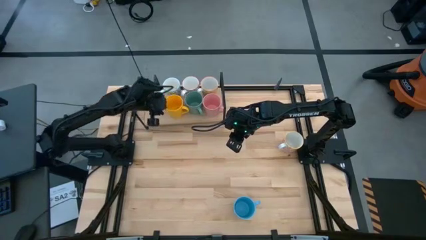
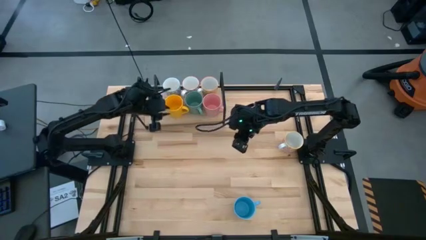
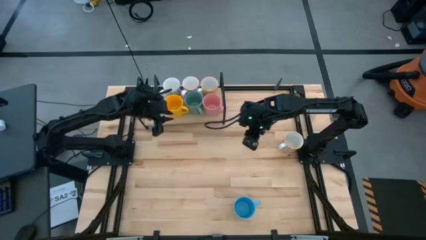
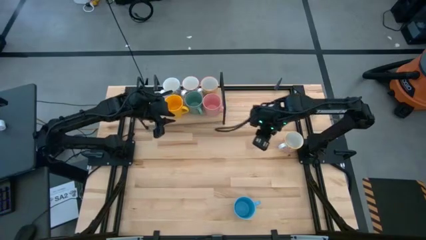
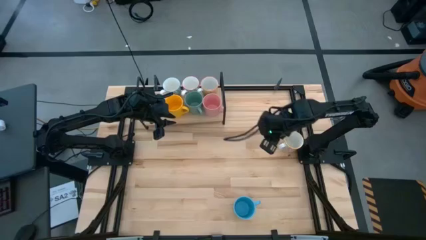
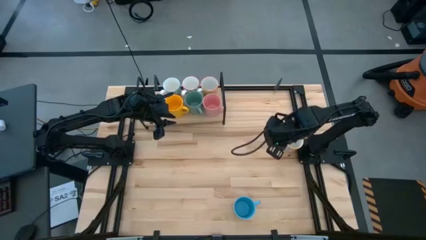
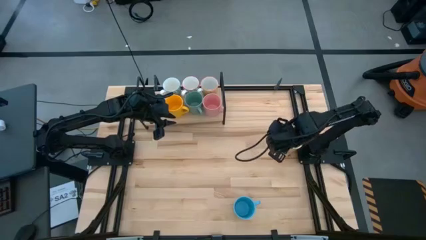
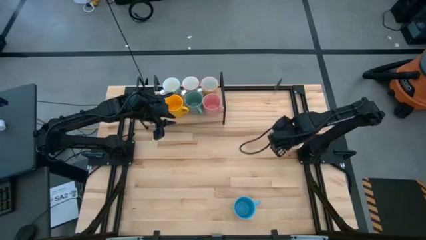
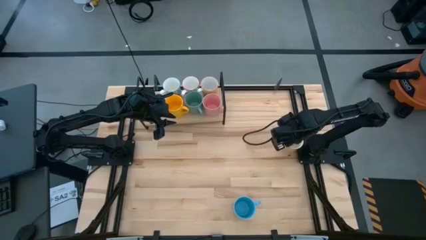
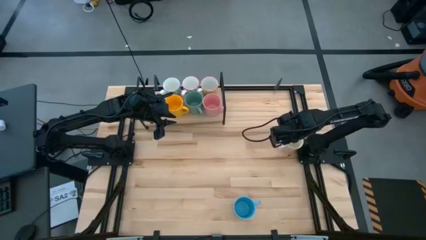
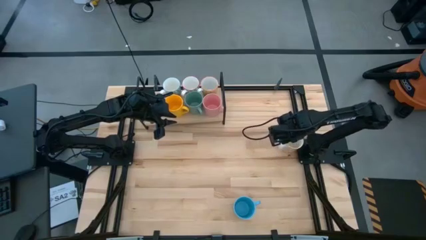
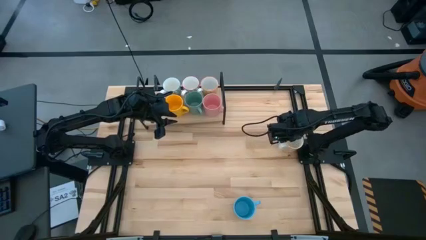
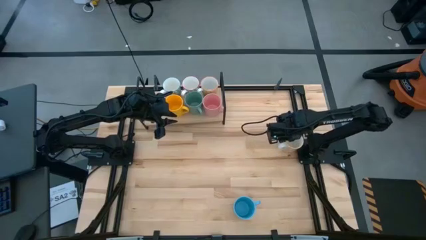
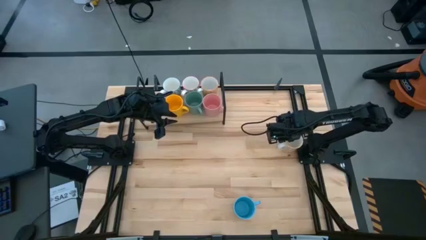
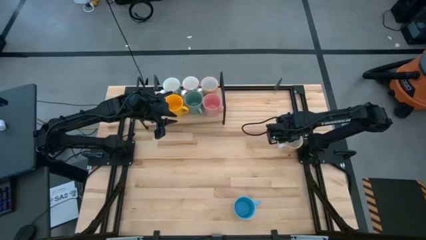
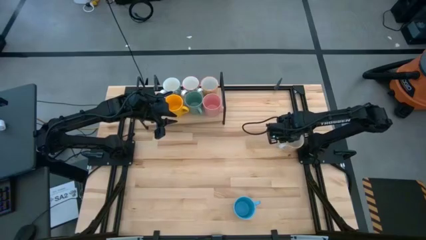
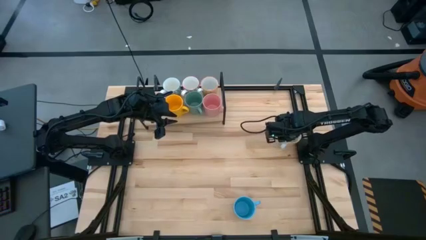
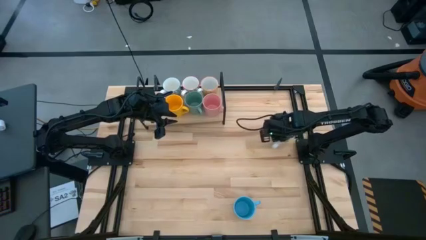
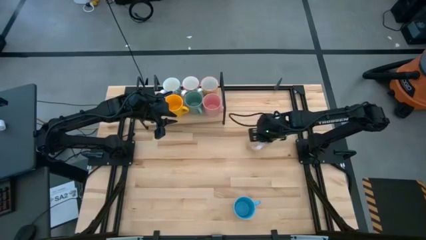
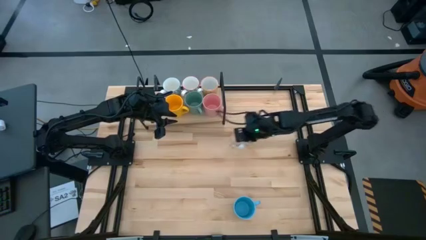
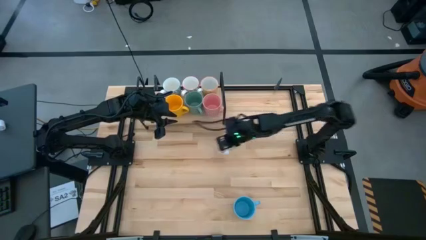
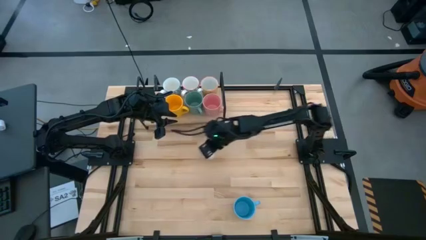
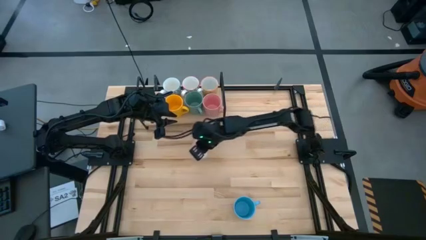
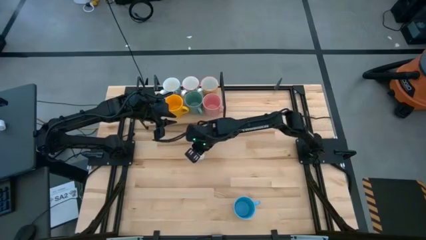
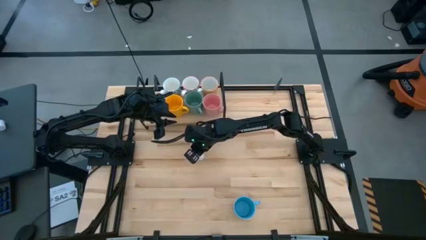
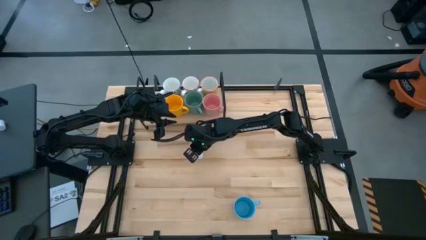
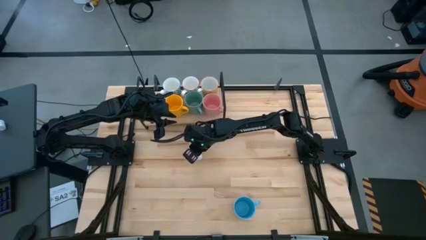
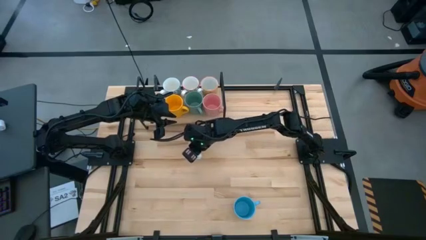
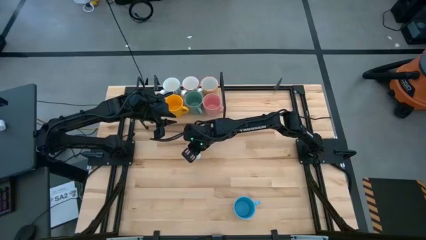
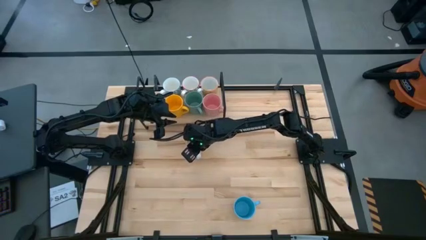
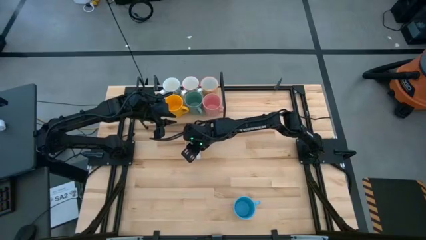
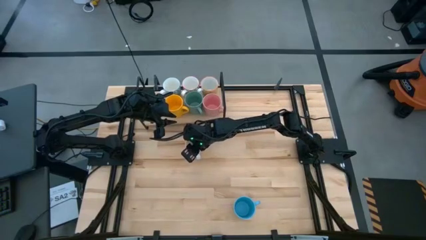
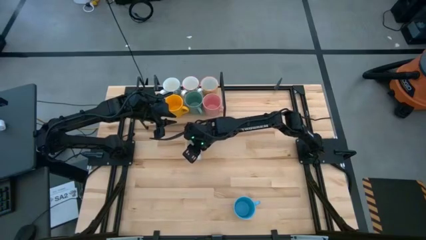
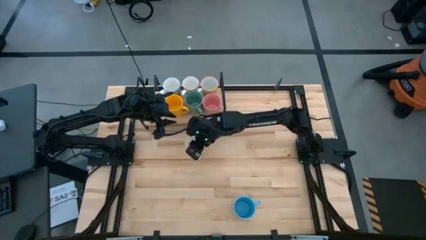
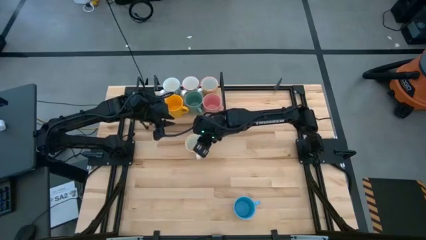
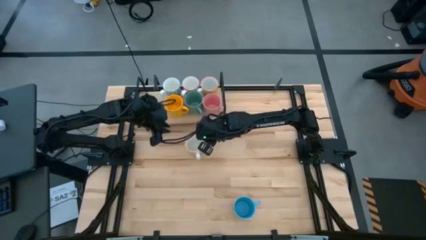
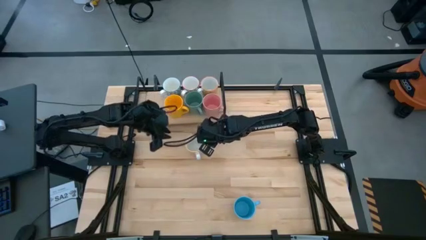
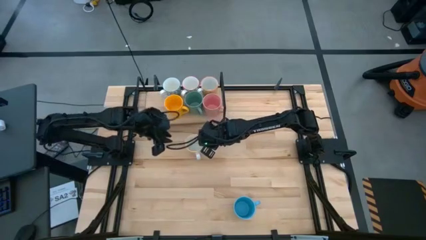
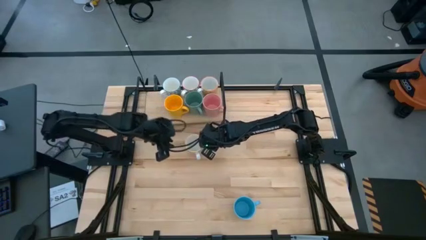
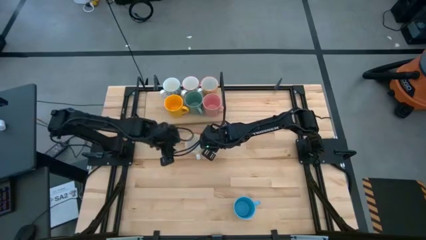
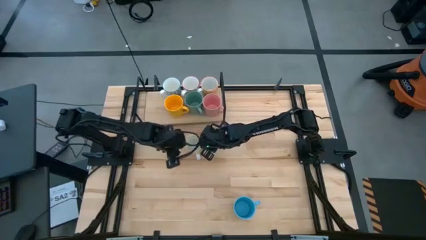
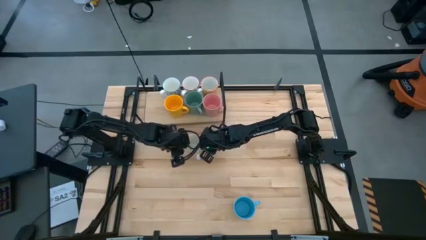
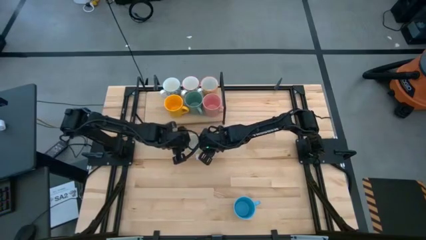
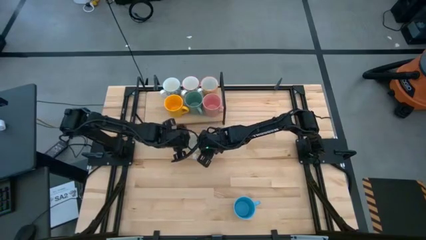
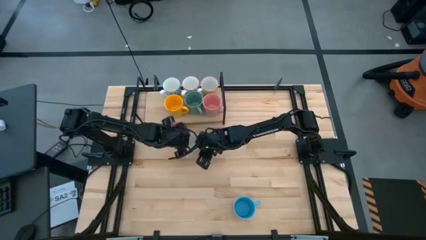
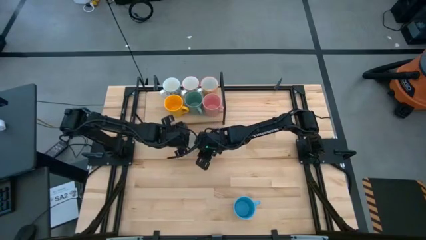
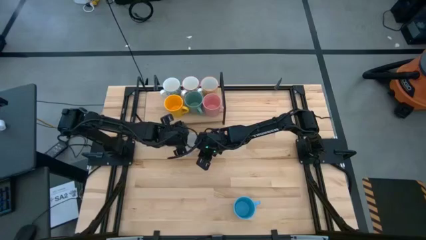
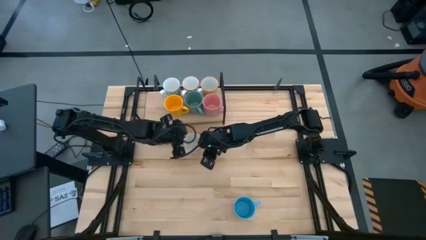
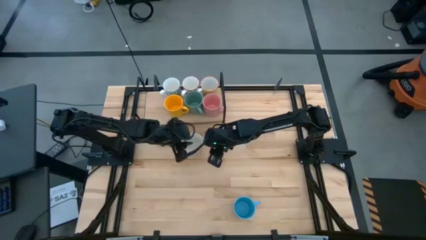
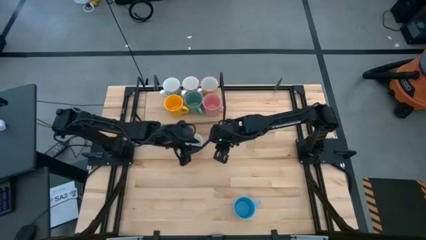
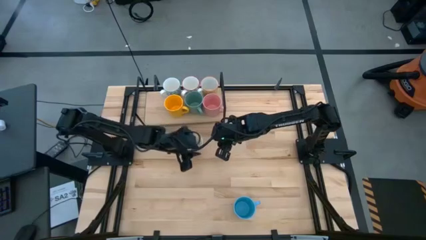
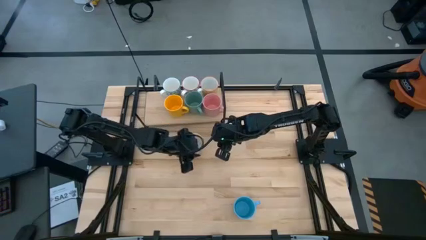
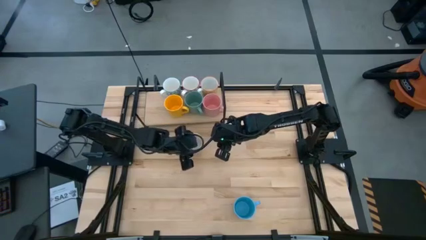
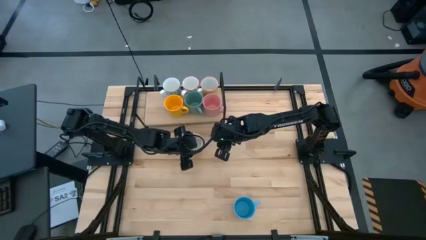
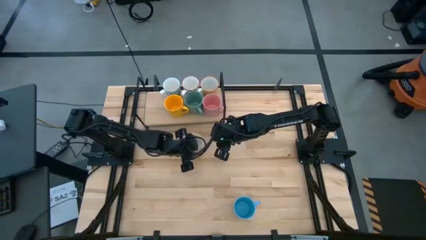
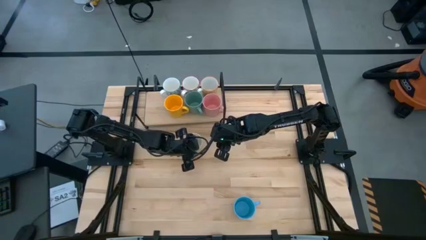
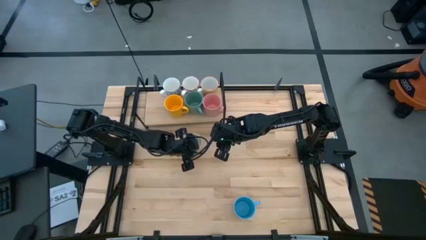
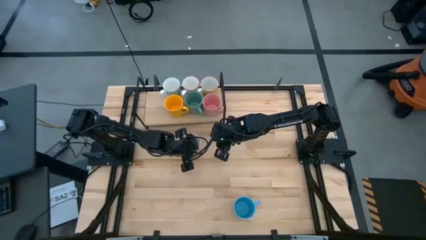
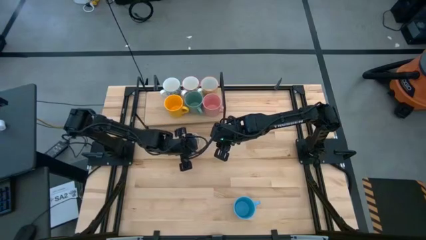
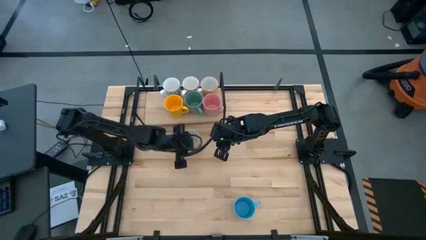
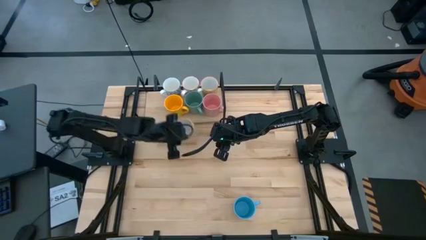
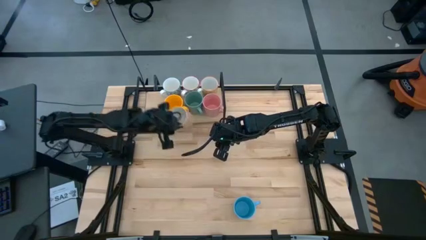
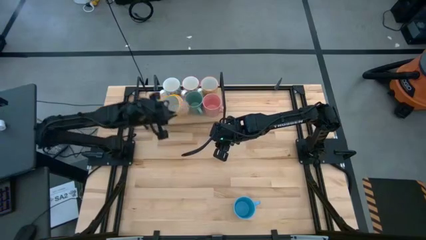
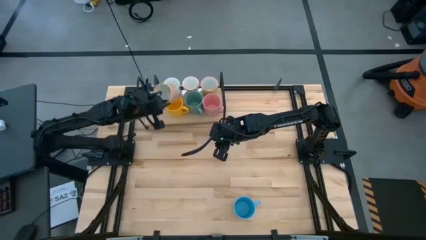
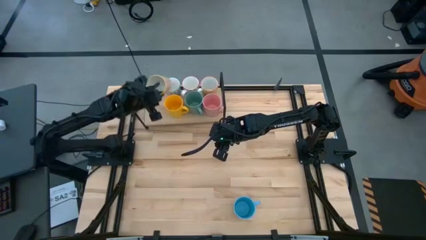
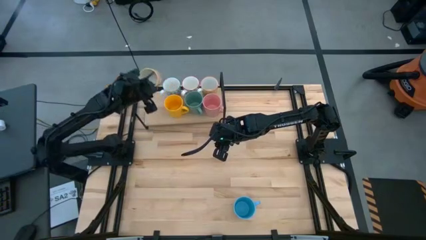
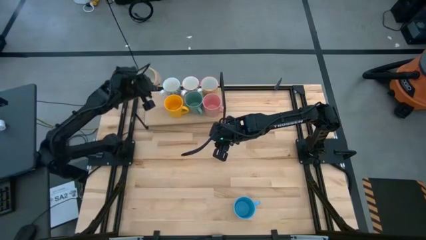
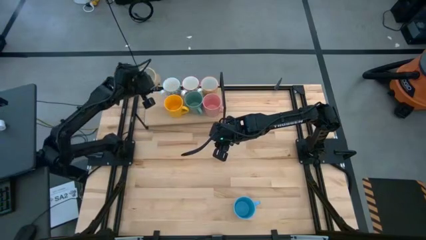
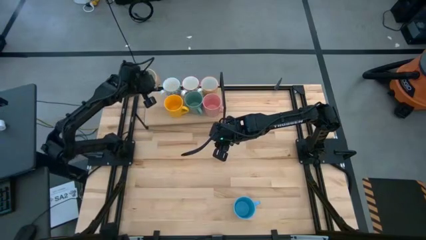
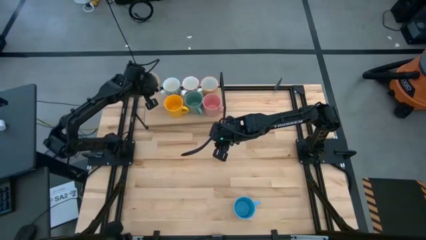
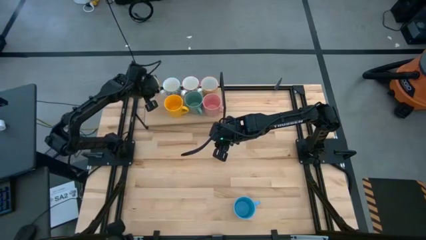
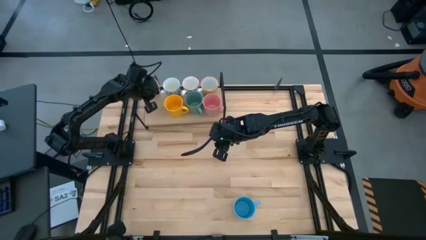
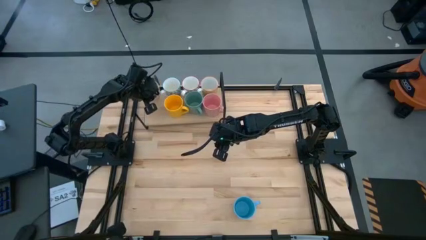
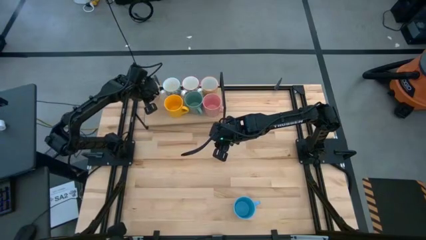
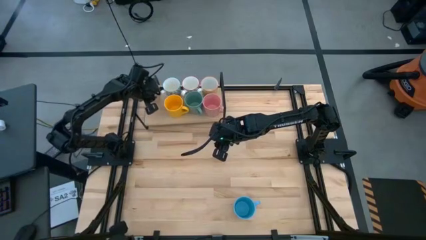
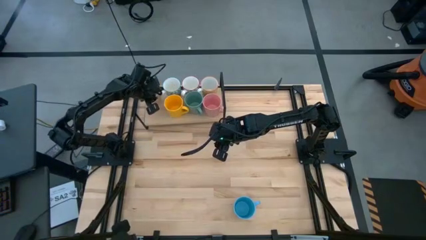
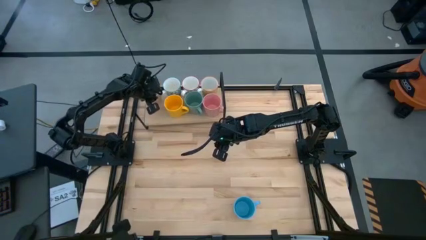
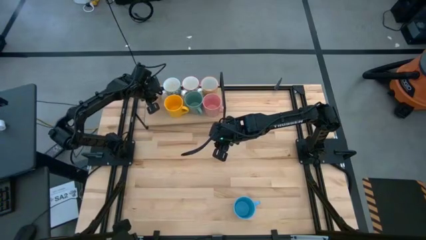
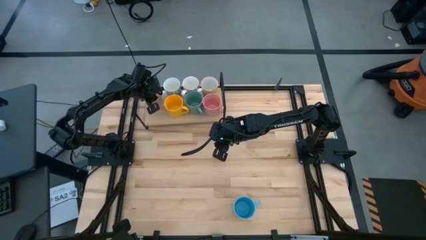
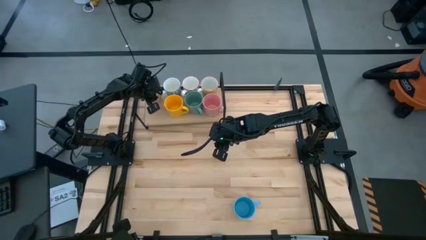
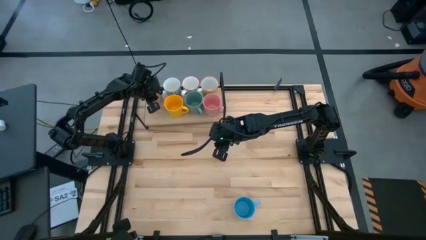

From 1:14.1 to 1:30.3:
Task: Place coffee mugs
Put the orange patterned mug on the shelf
